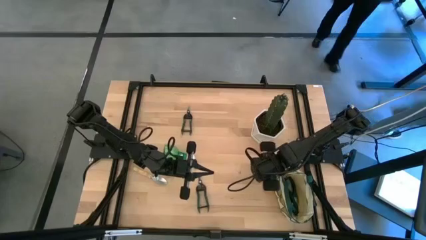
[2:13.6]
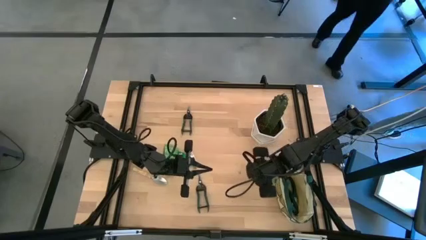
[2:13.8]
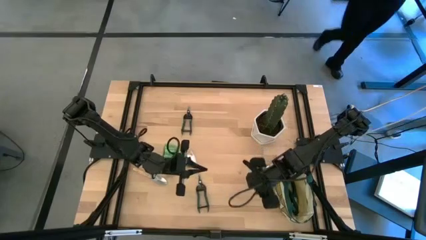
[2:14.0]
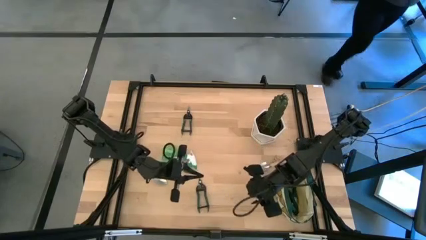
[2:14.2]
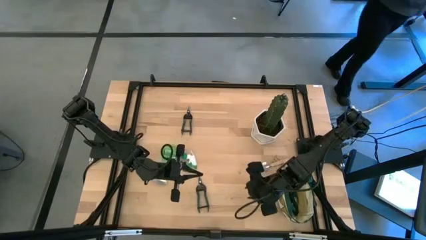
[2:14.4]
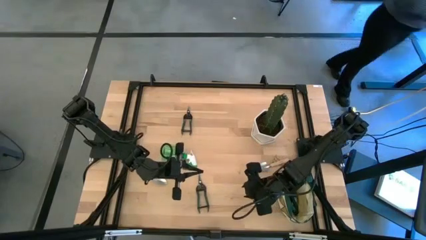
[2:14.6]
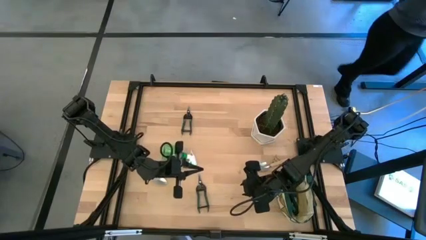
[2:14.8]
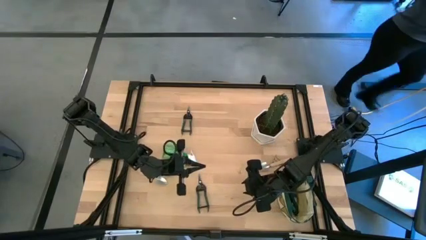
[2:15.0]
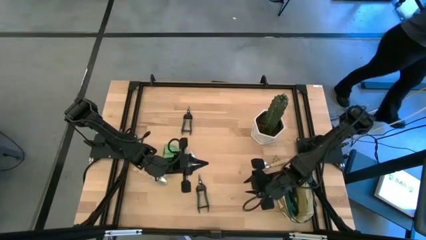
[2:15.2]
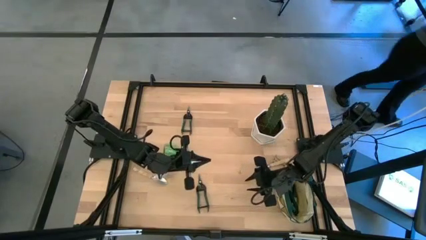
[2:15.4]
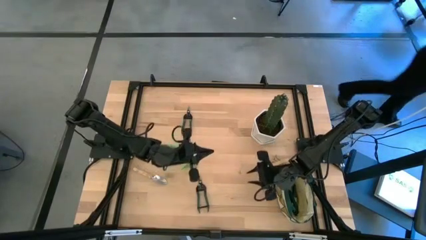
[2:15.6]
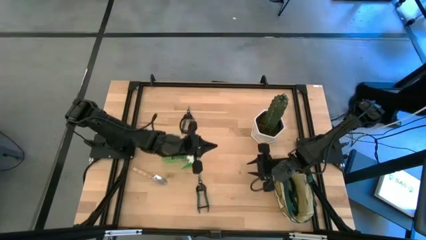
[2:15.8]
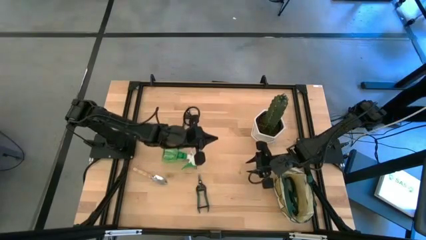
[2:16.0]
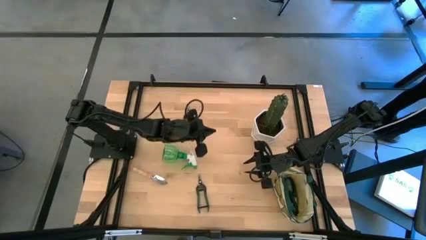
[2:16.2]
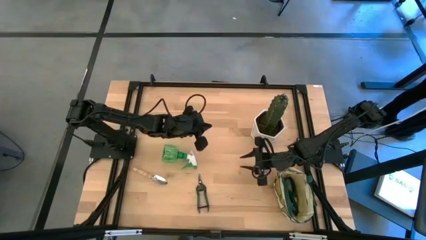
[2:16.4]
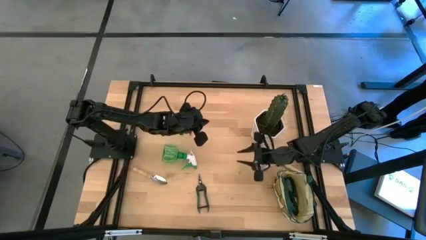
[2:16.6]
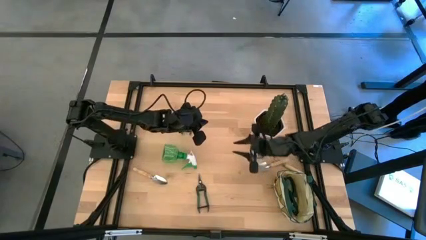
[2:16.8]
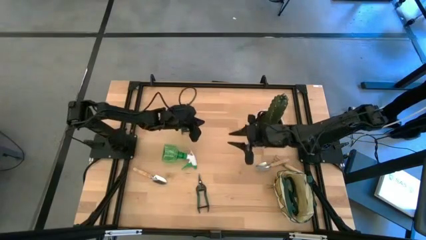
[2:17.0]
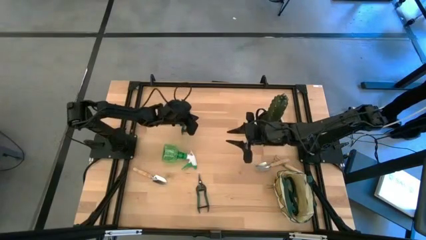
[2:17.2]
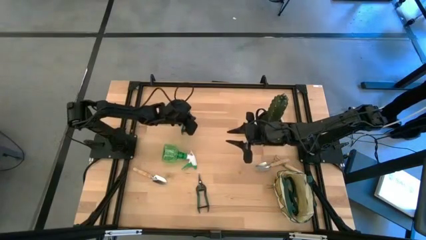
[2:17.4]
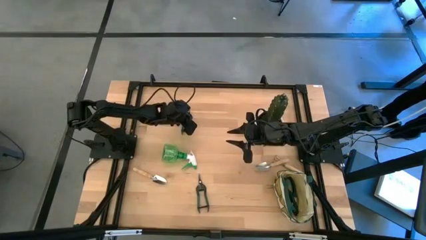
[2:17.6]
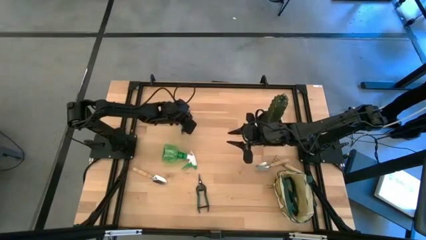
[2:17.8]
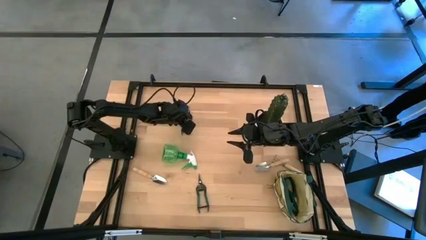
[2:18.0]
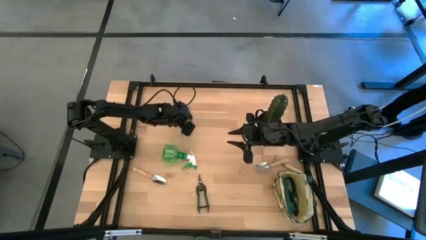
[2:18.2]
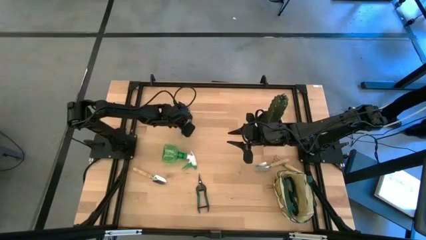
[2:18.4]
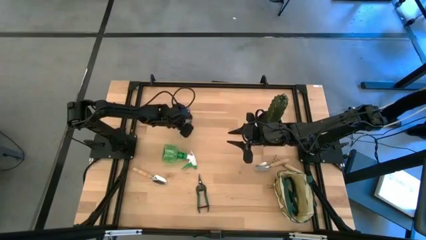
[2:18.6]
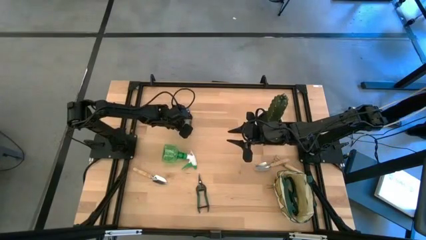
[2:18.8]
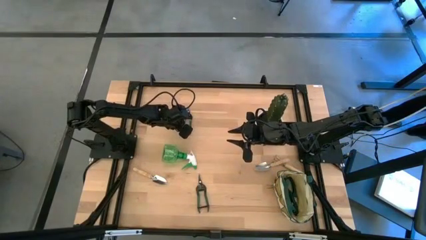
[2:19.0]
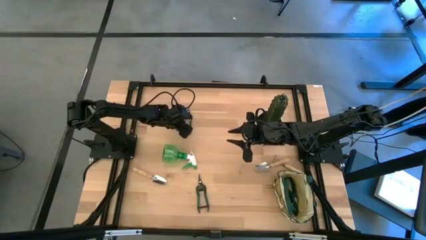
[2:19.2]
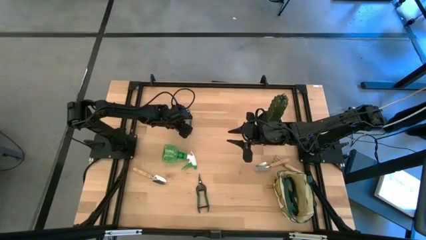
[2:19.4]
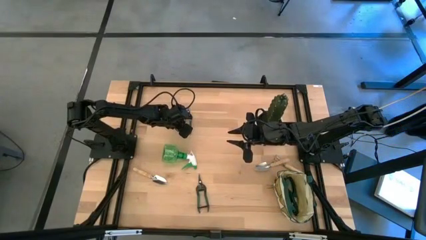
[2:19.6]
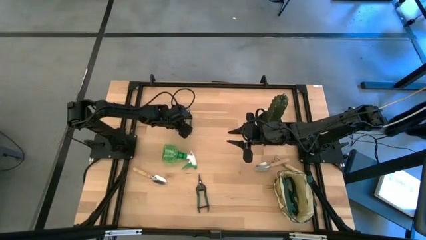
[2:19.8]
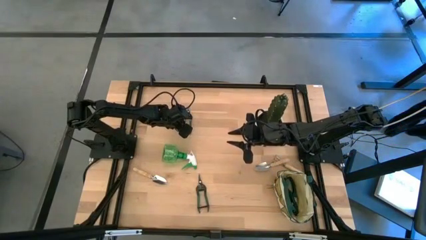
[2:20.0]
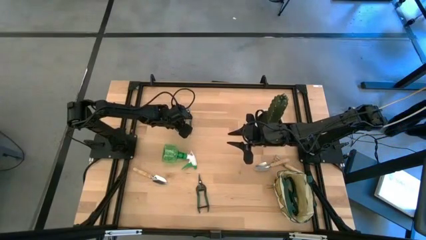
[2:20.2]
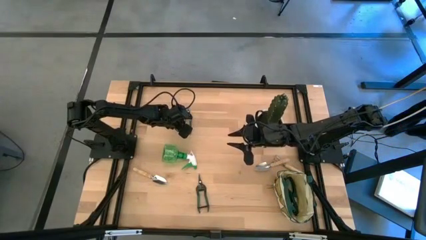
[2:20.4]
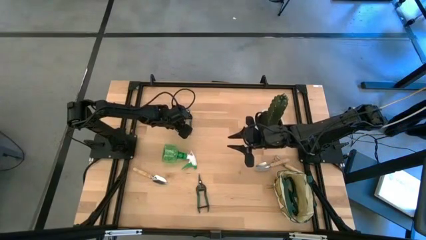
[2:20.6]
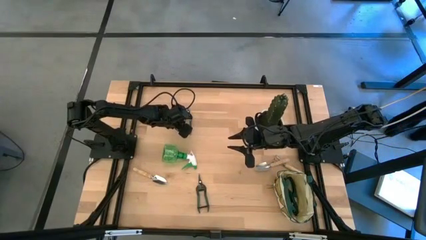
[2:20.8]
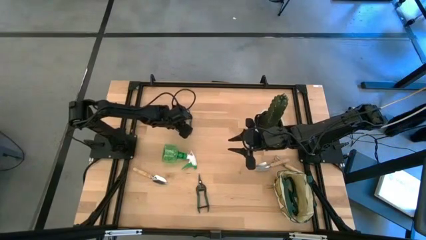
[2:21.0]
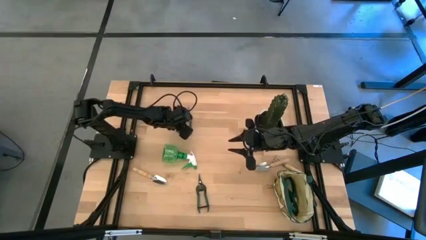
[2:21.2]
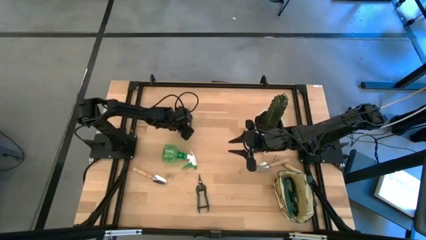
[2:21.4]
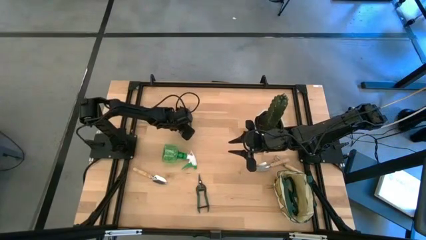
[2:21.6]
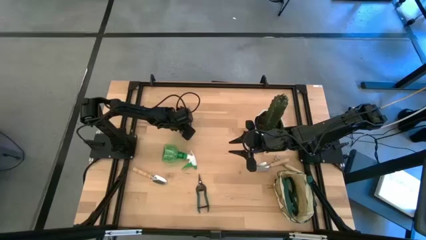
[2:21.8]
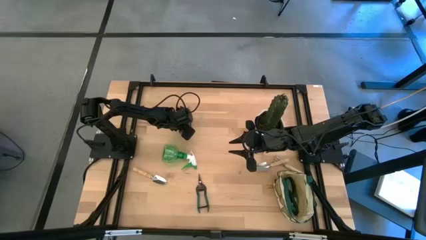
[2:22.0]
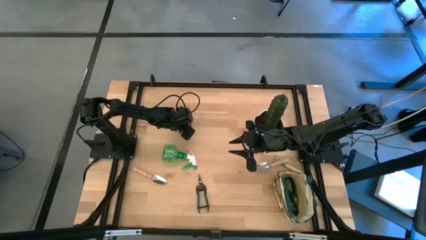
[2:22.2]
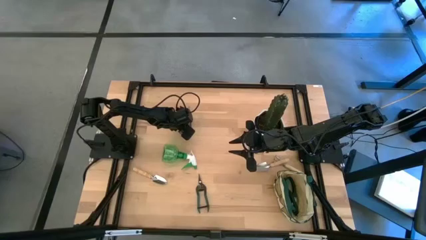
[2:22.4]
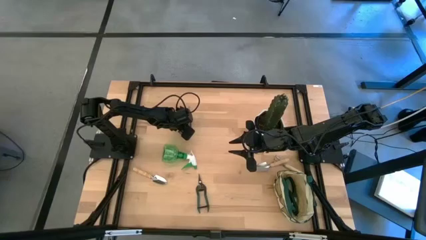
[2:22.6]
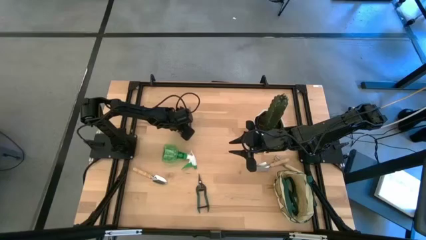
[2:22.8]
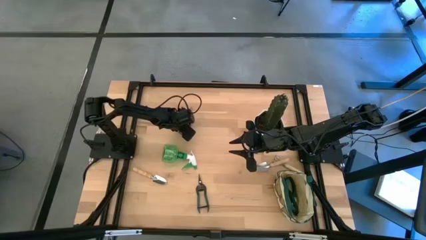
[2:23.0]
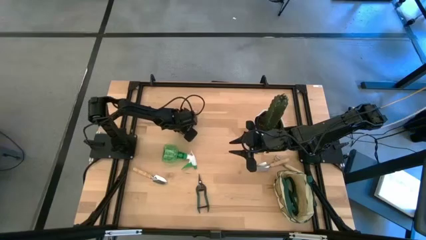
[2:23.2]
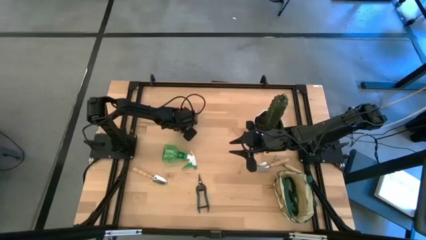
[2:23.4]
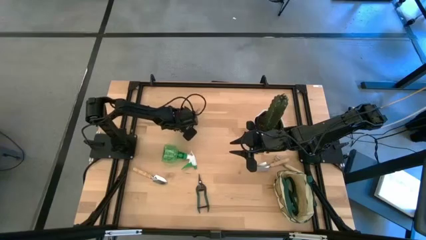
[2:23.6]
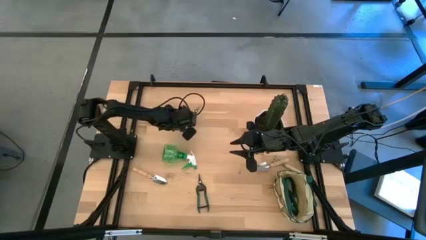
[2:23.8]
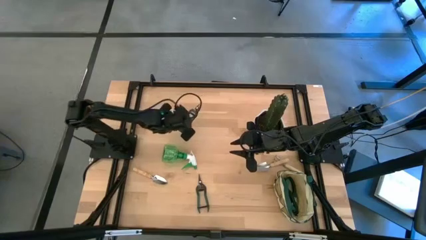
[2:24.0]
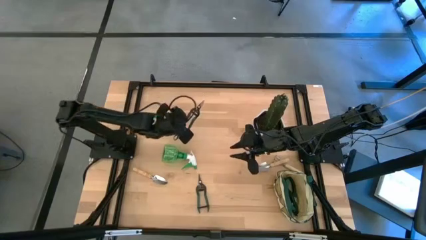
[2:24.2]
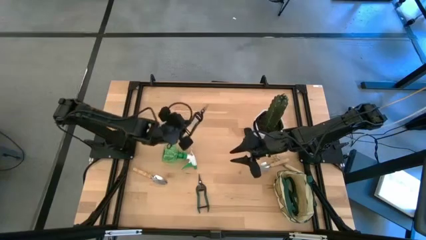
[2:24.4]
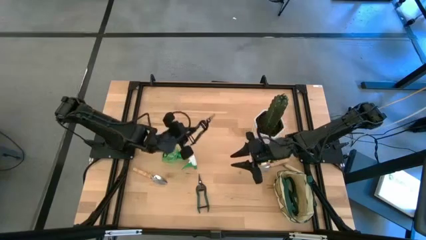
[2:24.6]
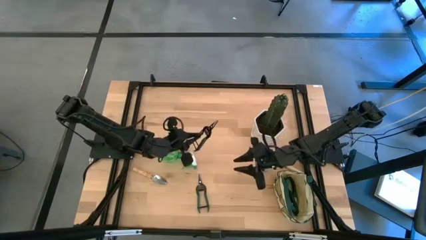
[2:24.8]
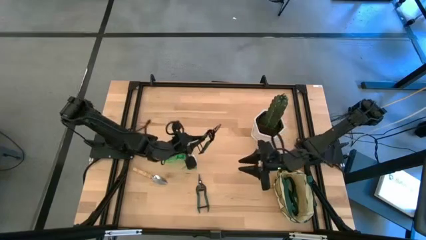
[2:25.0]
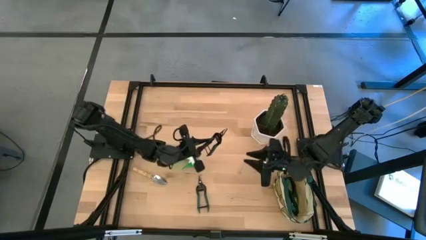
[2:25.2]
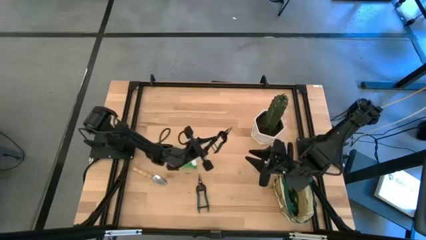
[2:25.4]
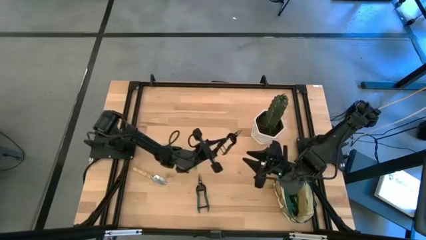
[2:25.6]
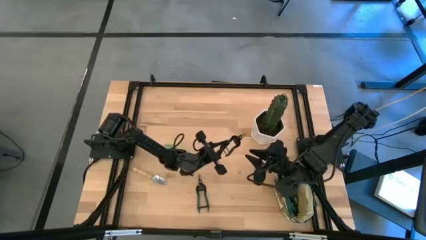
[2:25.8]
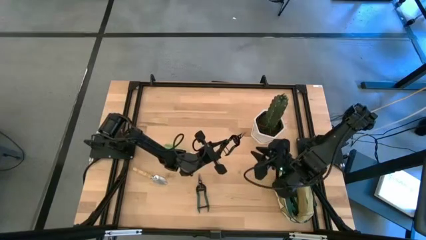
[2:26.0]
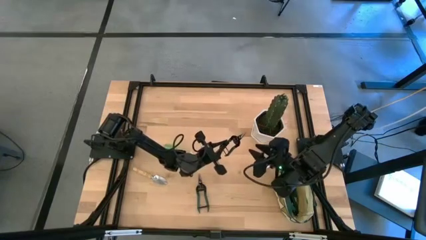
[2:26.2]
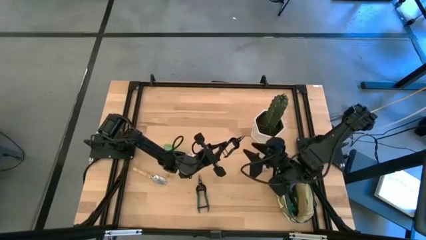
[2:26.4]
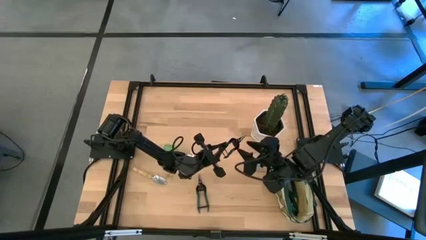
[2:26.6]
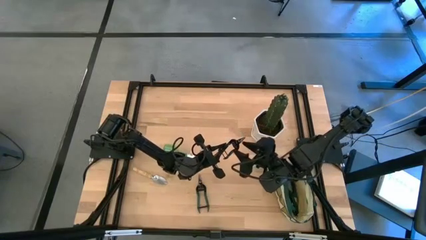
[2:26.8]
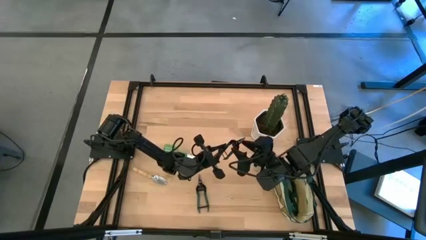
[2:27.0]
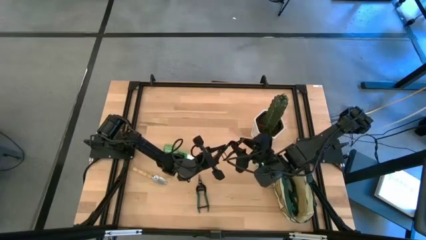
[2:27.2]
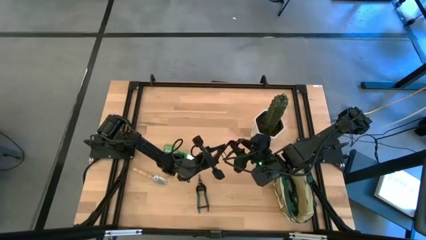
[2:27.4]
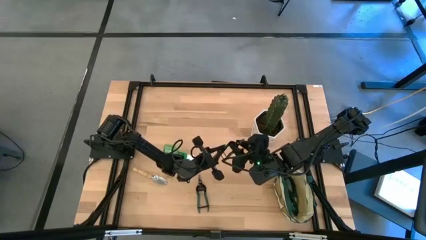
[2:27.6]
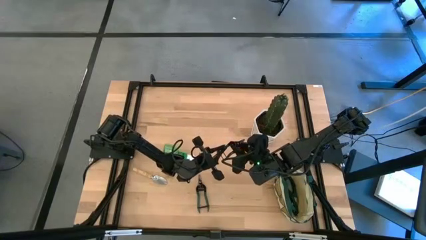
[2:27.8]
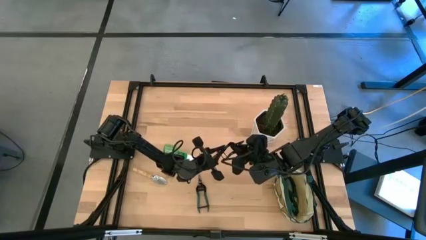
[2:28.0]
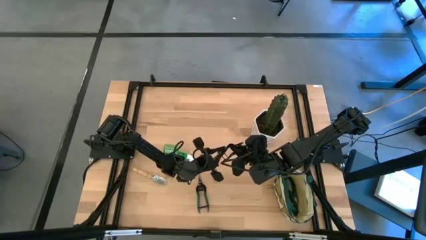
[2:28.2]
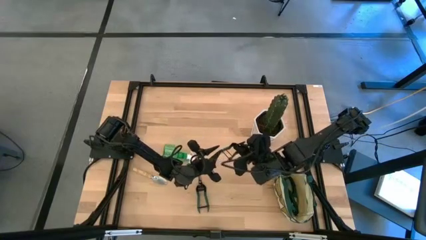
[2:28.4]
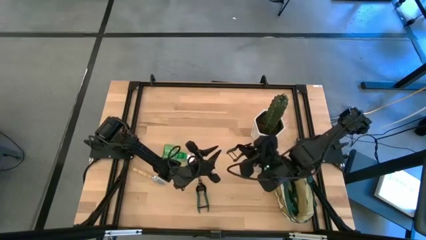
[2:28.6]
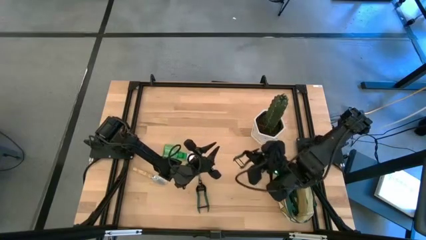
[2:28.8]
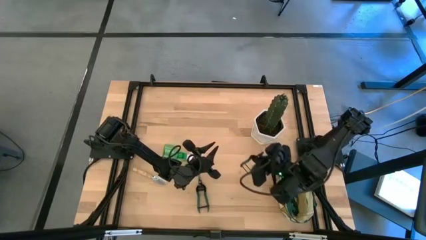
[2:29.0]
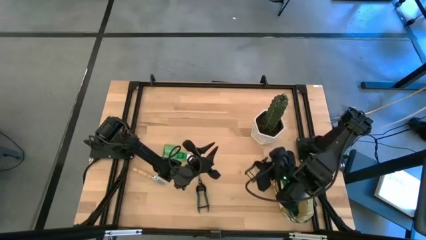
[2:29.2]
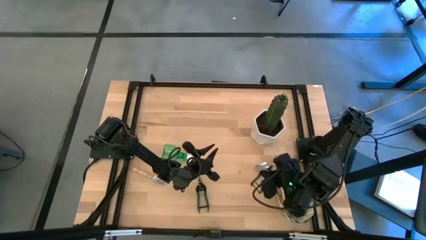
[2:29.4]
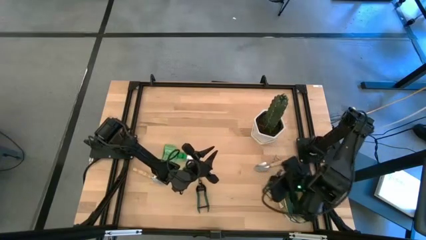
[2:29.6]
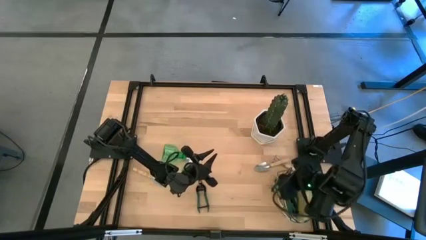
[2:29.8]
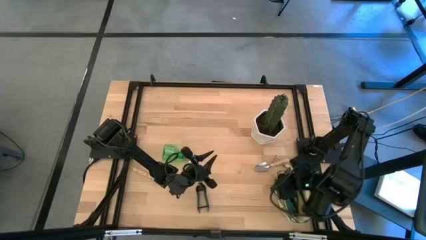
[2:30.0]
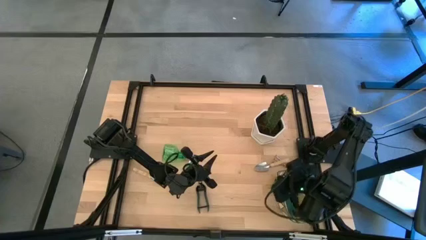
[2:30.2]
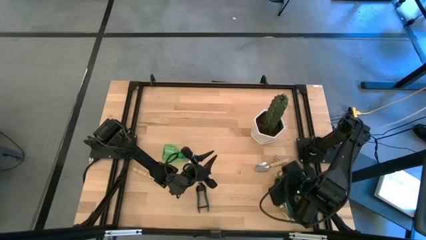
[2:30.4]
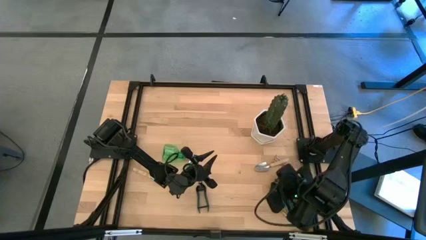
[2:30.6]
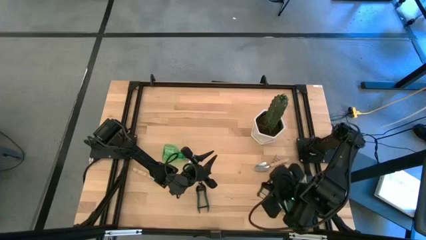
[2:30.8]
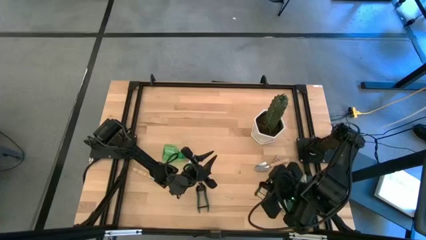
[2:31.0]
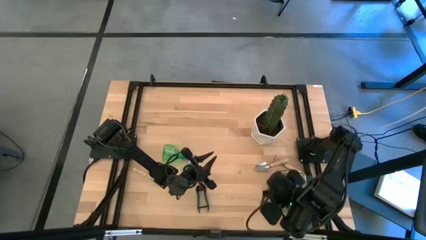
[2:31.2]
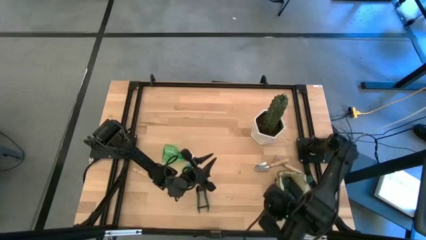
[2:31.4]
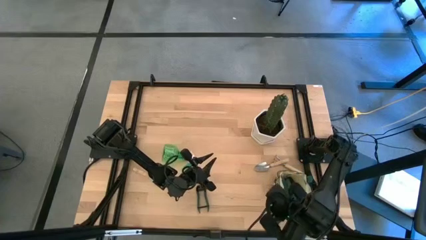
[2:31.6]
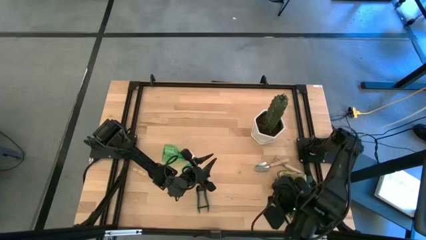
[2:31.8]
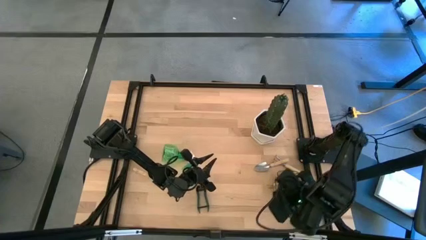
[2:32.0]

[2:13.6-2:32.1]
Task: Pick & Place Garden tools in Gardening bag
Put the top grafting pruner into the side pocket of the white bag
